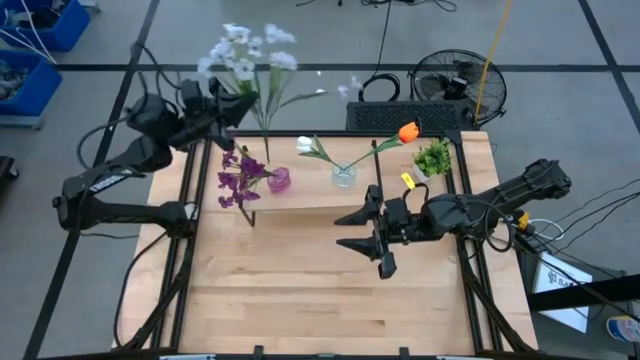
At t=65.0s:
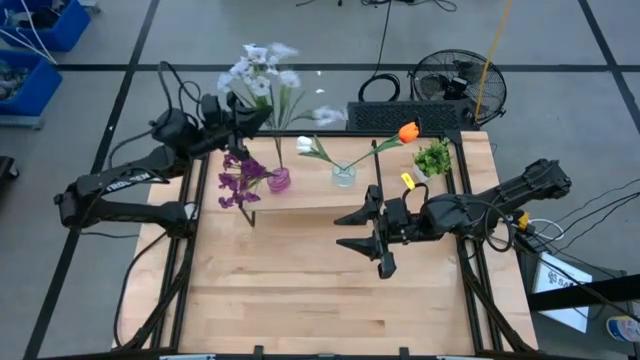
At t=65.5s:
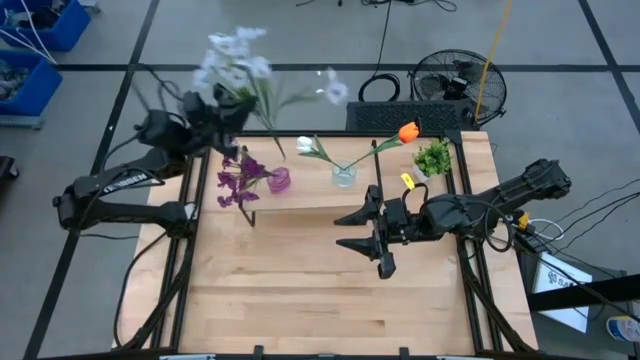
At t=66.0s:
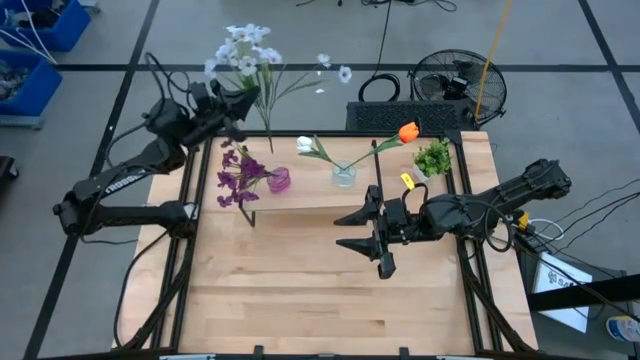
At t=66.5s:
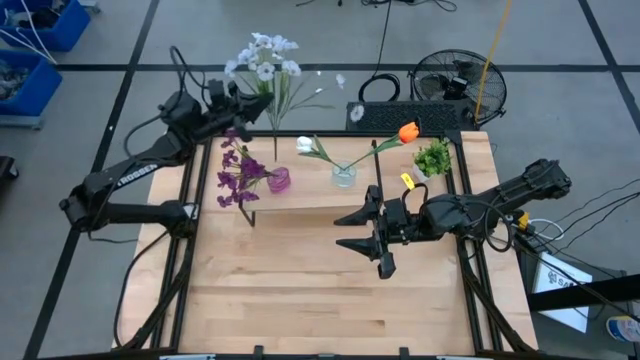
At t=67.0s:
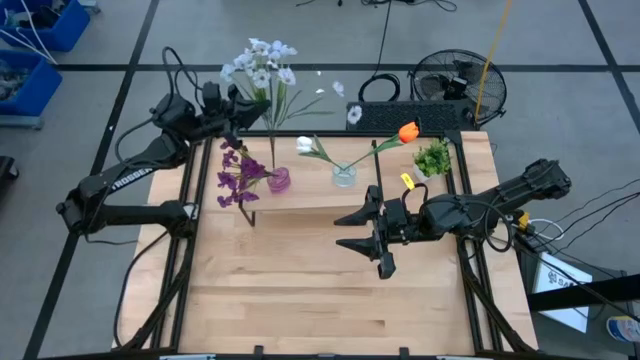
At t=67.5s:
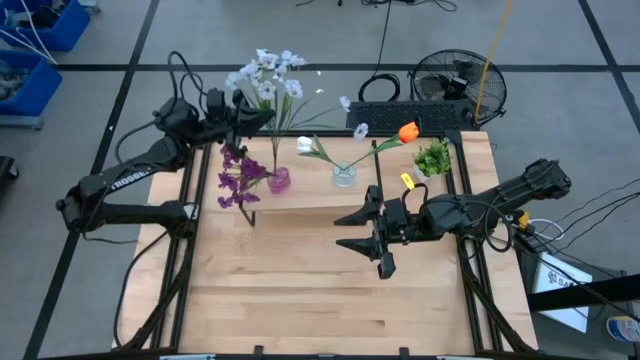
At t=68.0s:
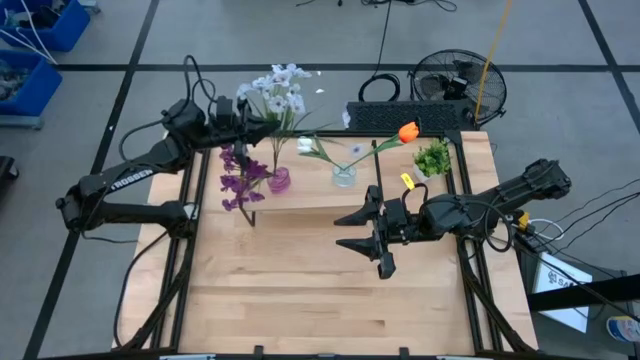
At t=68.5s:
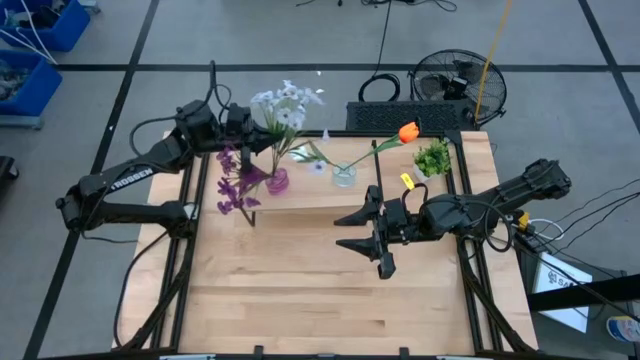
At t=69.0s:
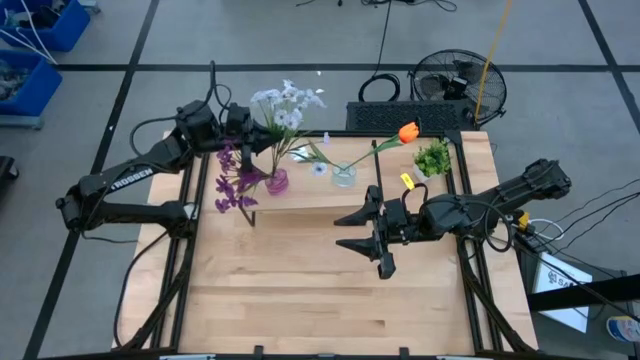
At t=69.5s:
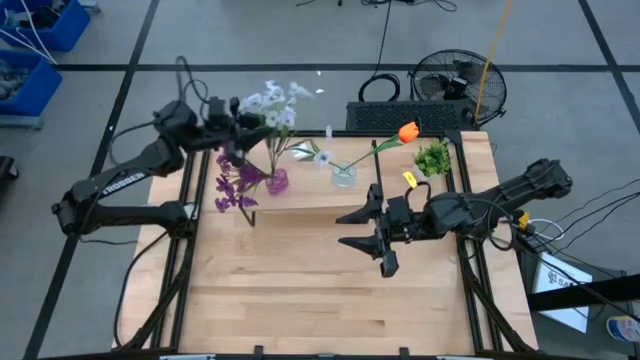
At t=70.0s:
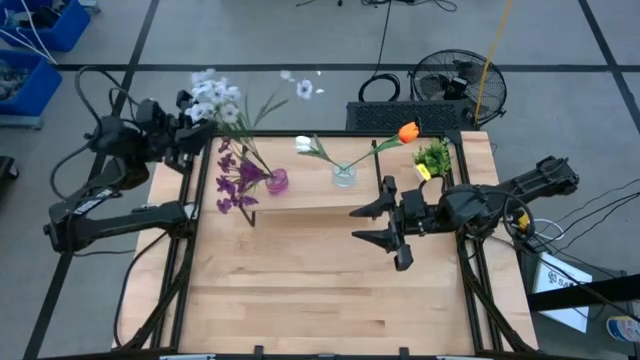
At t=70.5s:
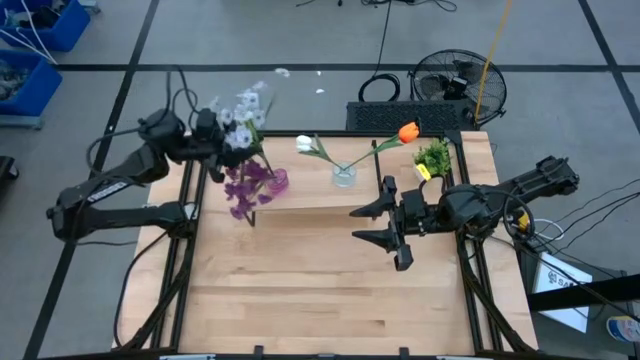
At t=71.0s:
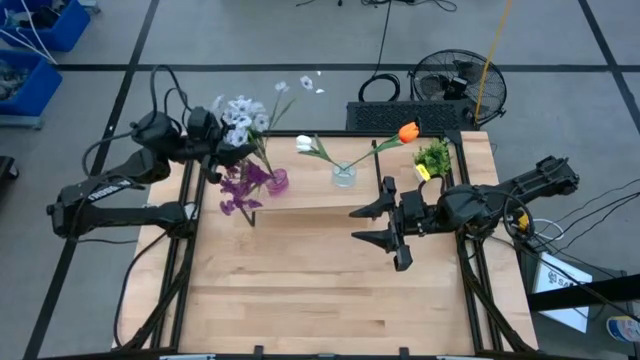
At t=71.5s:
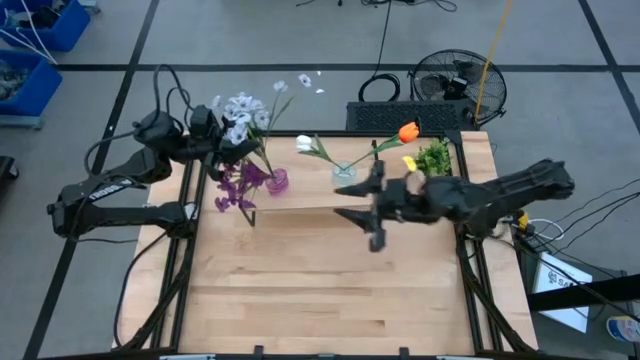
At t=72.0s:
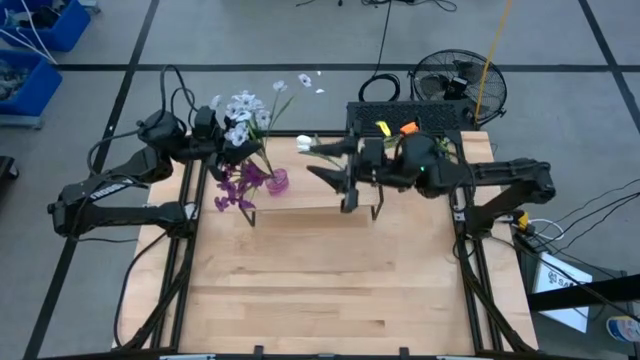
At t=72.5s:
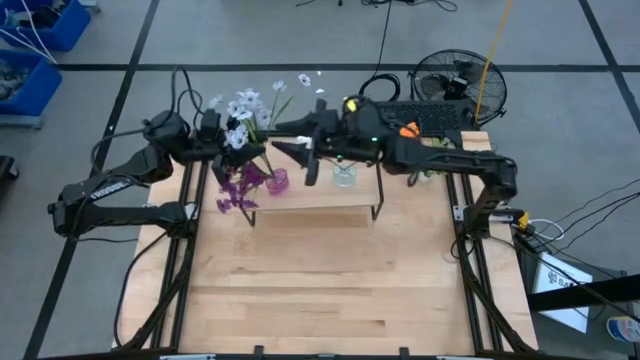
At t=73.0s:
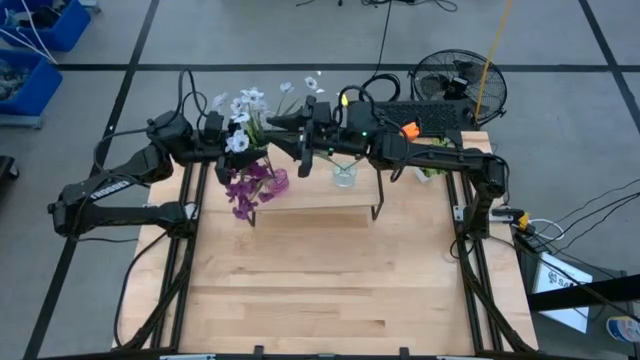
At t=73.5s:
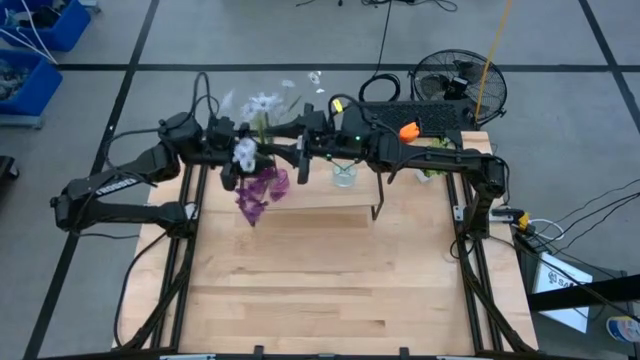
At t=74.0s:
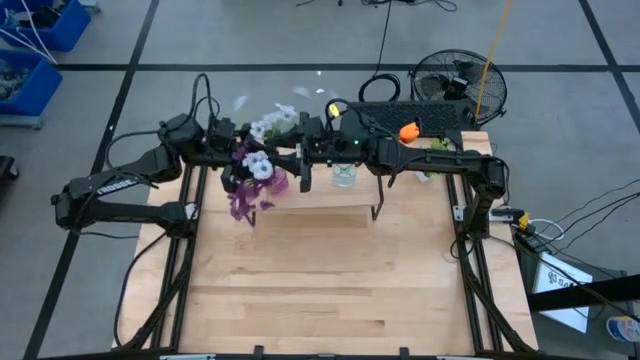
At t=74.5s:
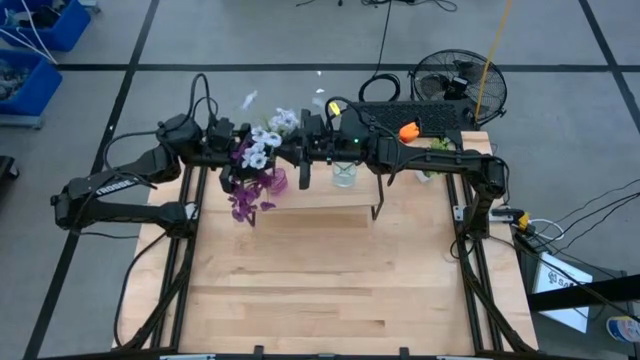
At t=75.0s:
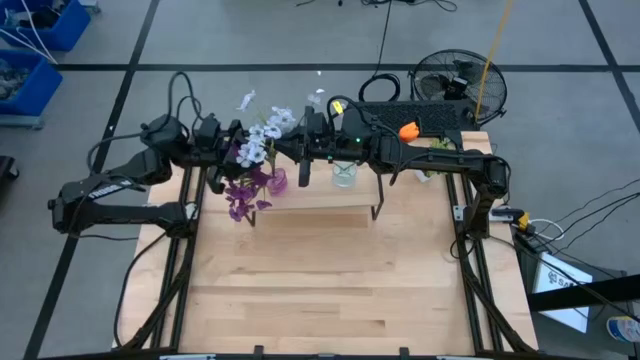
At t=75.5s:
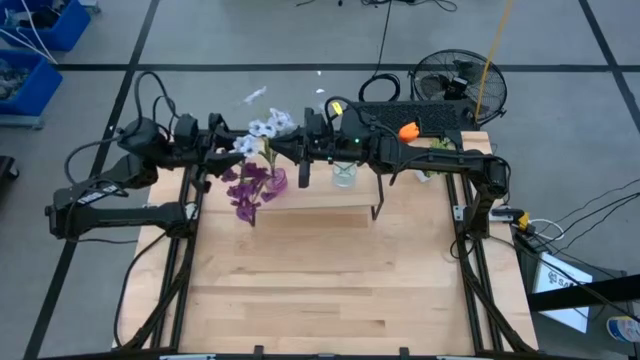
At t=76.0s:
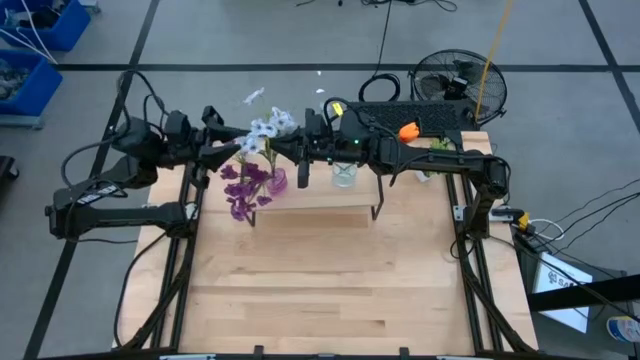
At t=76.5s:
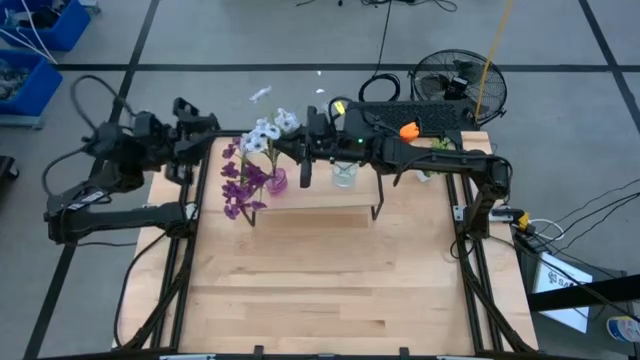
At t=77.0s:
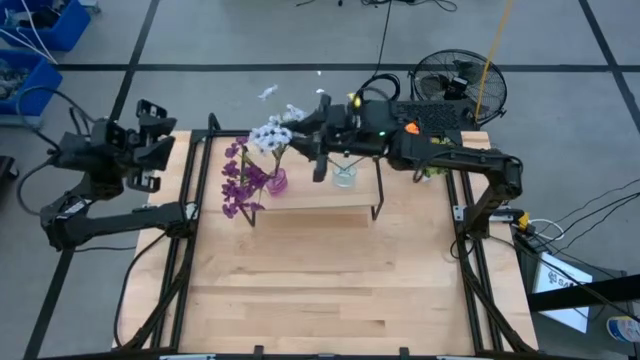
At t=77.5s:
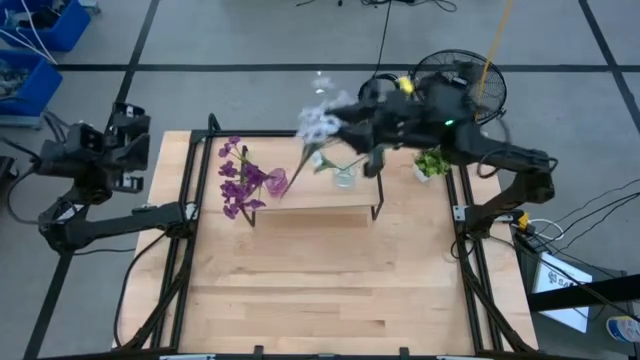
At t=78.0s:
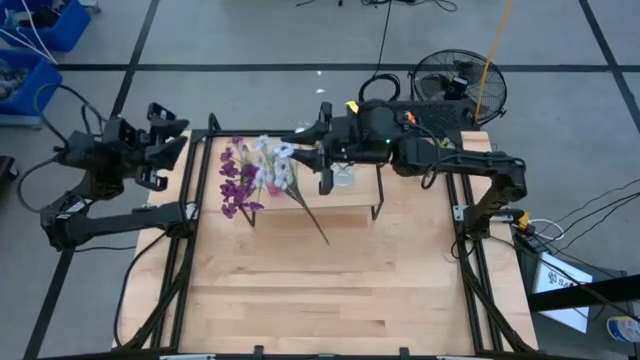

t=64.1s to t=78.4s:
Task: Pick and place flowers into a vace then onto a shelf
Put the white flowers into the violet vase on the shelf

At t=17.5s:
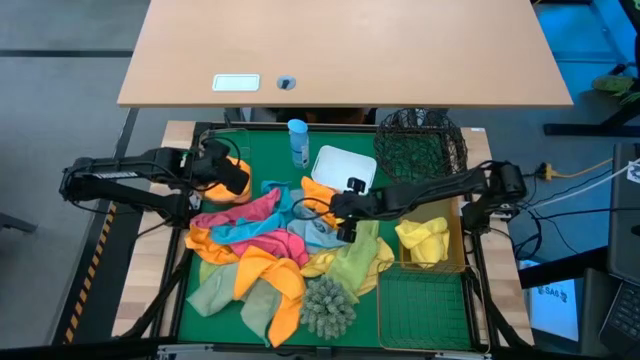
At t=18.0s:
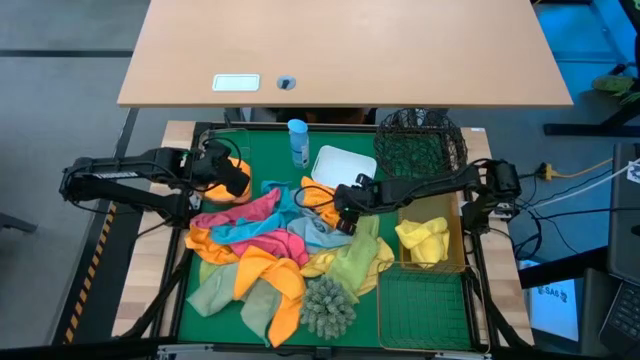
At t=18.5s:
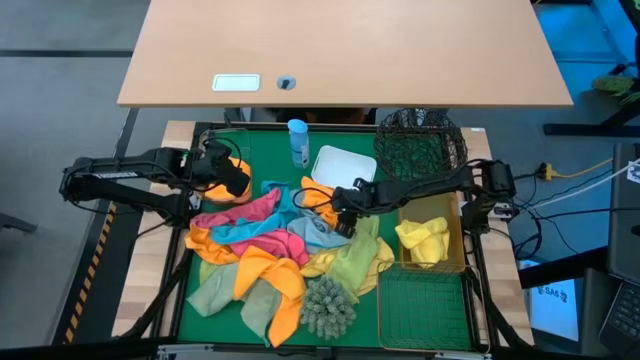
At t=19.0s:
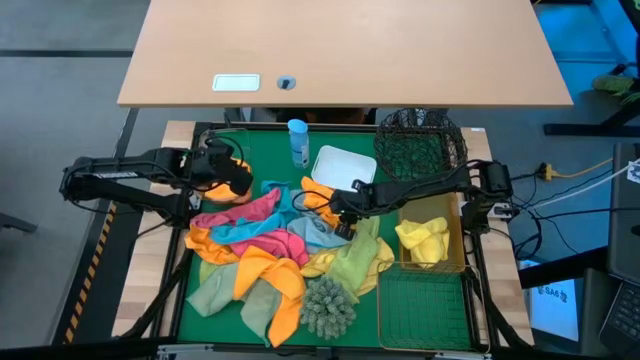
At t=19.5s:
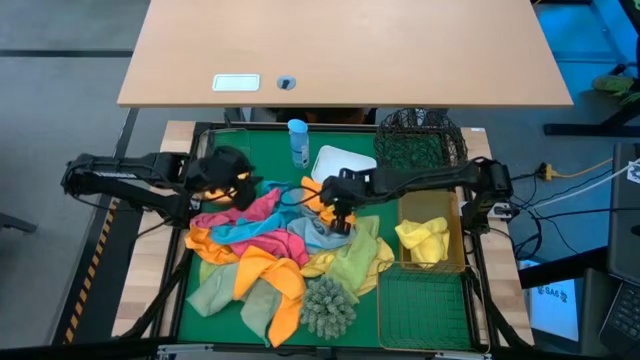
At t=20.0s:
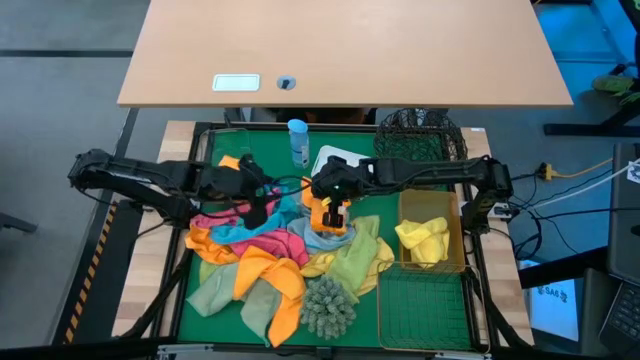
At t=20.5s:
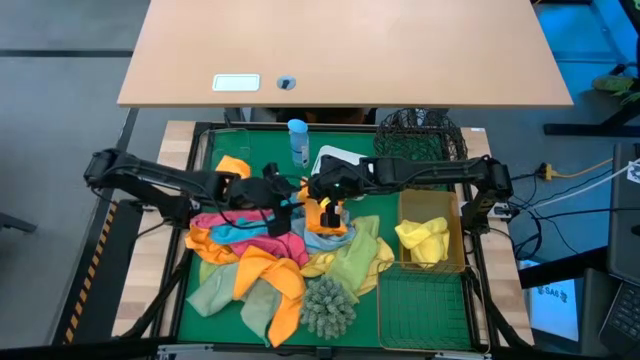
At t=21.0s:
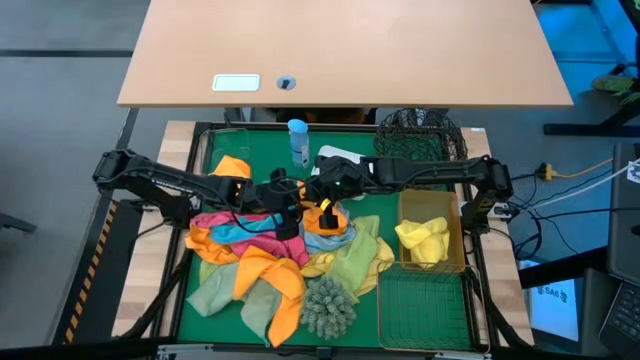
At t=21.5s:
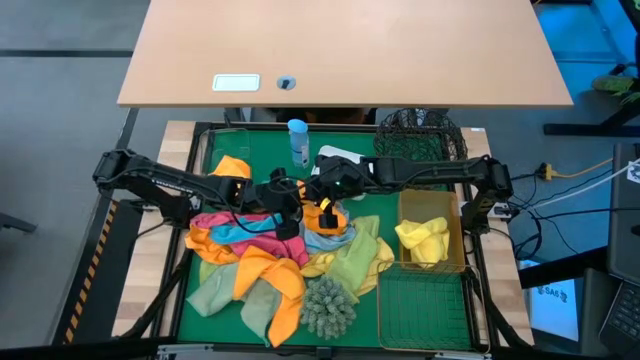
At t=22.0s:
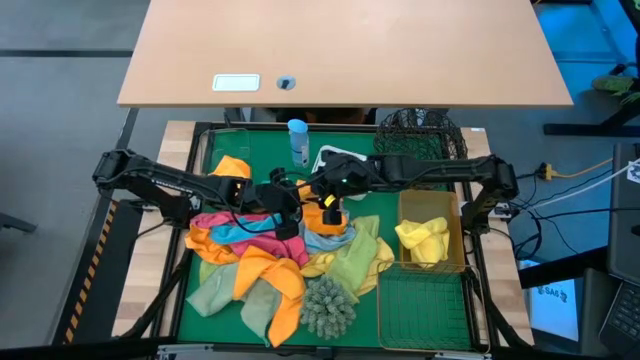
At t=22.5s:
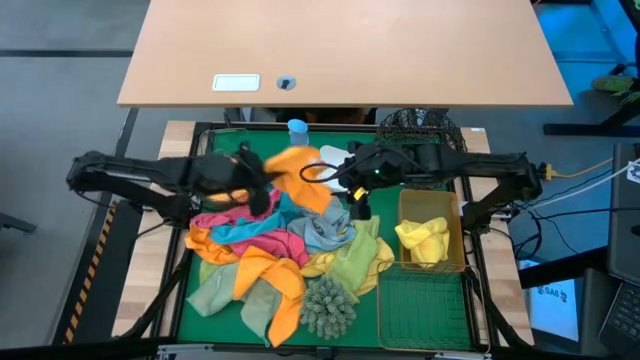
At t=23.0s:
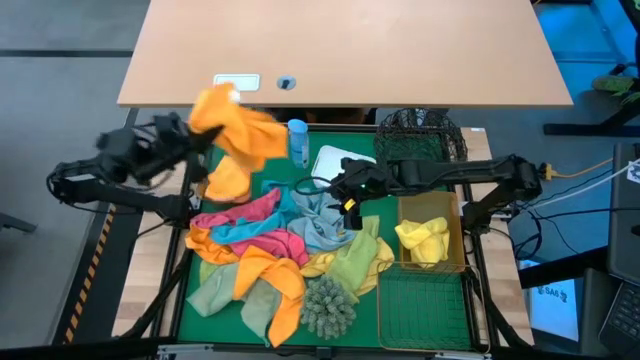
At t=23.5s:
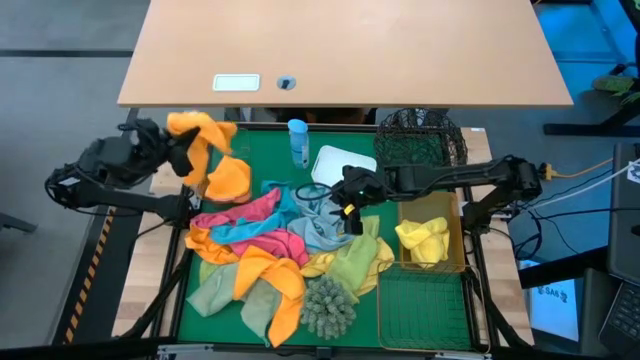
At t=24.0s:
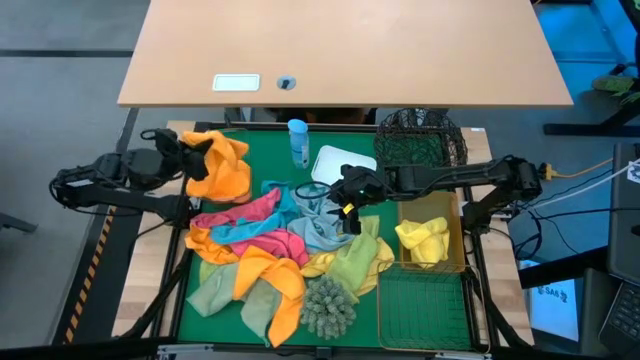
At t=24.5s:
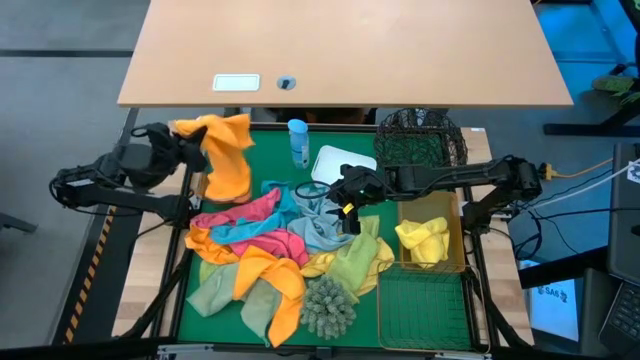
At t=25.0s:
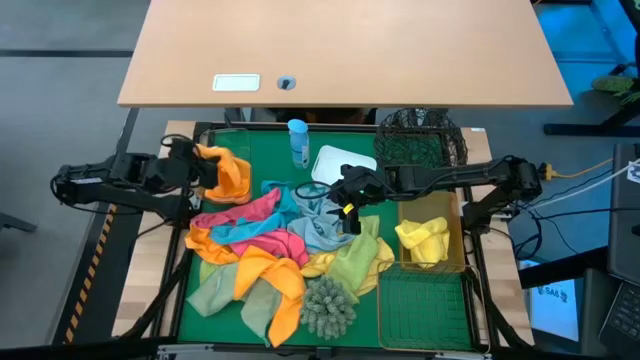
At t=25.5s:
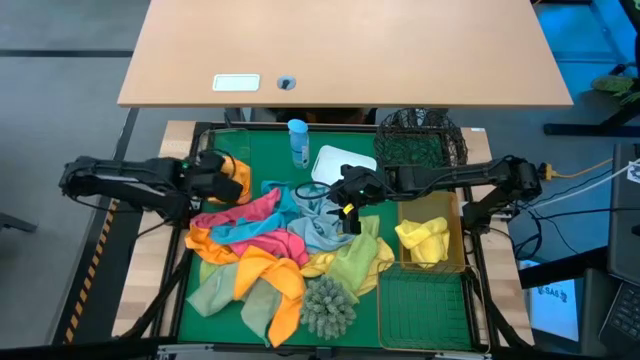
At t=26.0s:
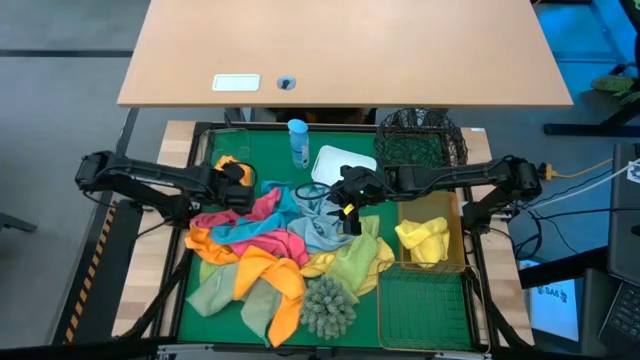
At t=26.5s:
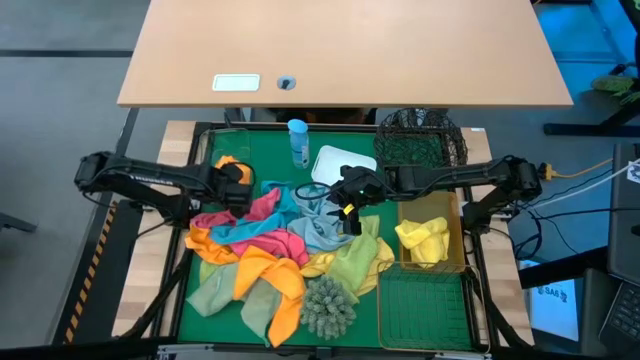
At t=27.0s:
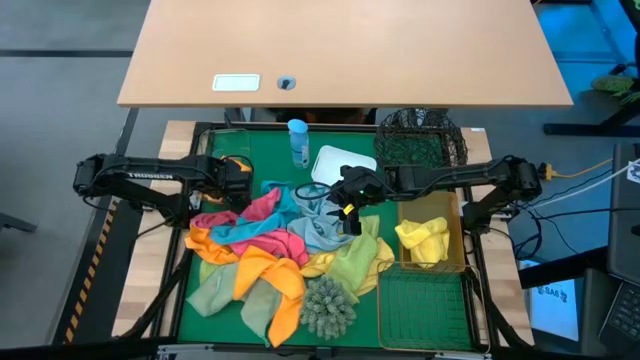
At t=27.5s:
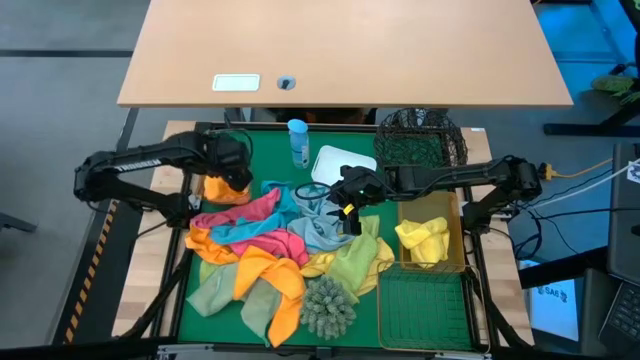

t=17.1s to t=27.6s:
Task: Sort microfiber towel by color & place in baskets
Put the orange microfiber towel into the transparent bin
